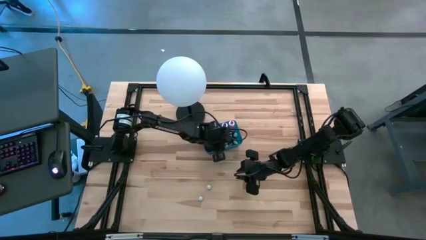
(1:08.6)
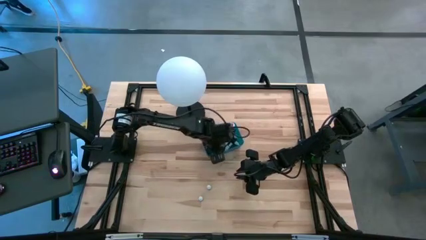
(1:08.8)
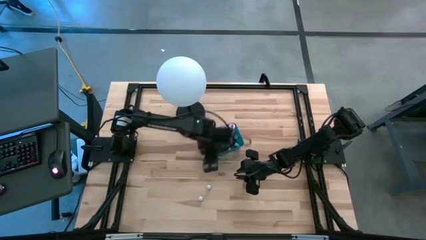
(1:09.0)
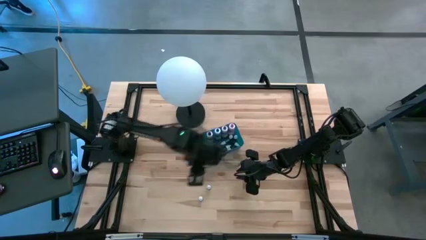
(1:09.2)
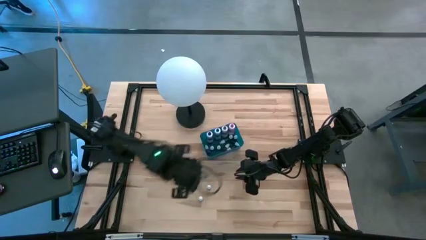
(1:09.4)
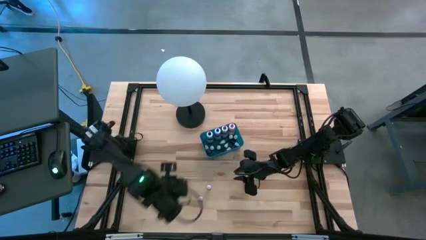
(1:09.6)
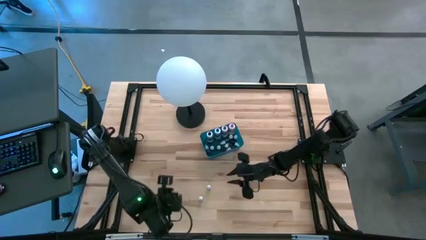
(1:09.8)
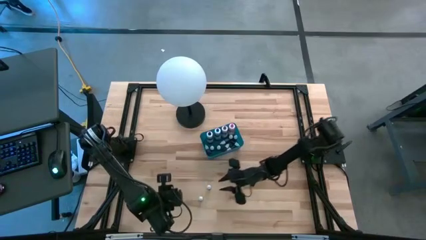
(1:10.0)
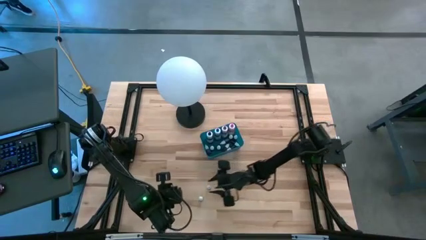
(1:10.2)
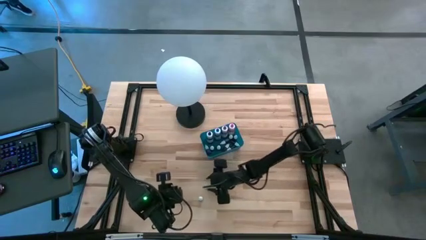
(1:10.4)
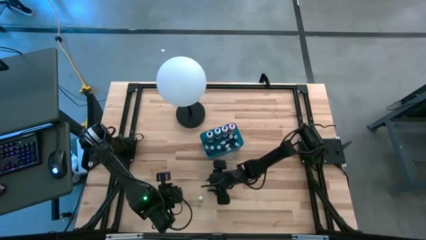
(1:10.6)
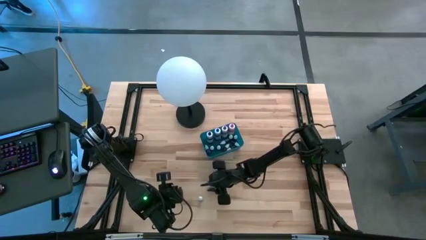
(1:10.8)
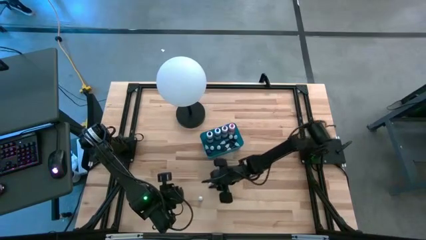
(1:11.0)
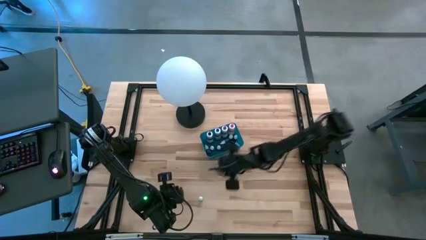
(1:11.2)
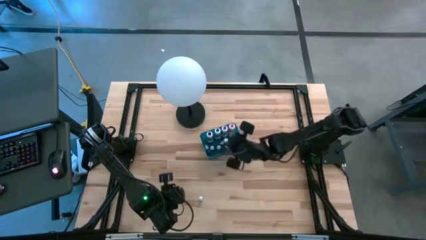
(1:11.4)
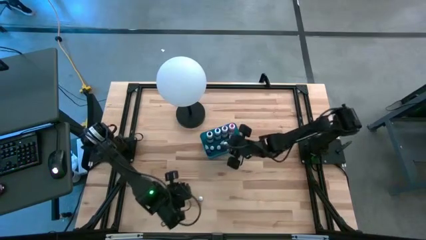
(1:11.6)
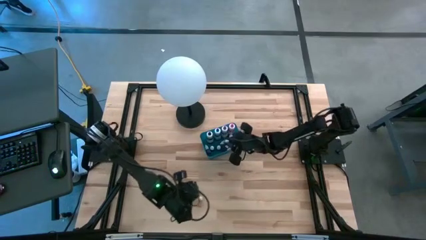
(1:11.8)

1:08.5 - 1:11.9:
Task: Pick & Place food coloring
Put the black food coloring bottle into the bin

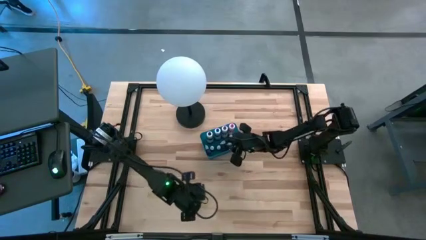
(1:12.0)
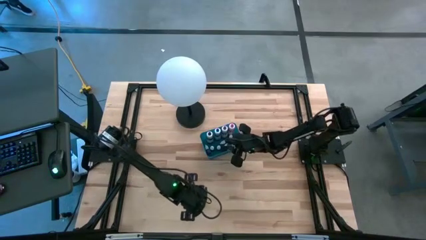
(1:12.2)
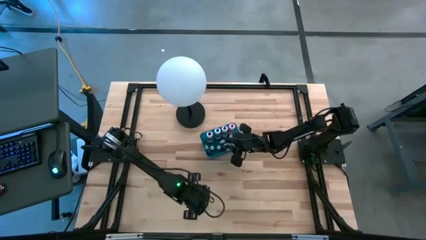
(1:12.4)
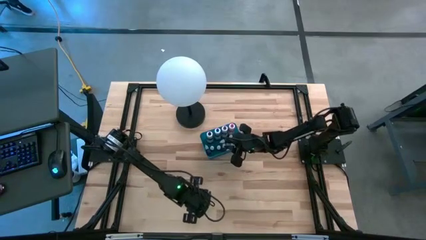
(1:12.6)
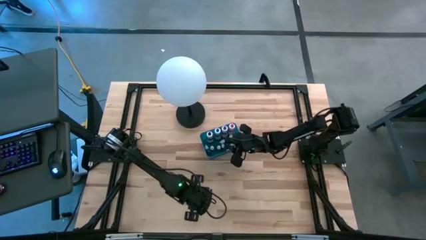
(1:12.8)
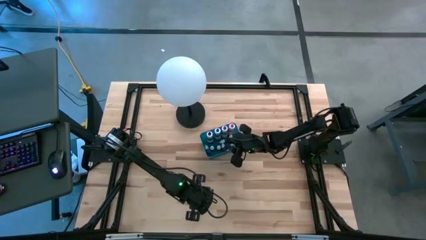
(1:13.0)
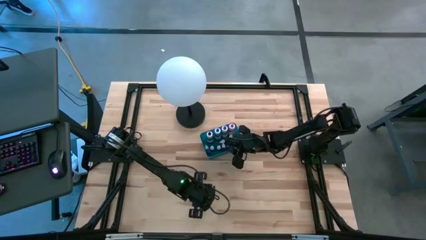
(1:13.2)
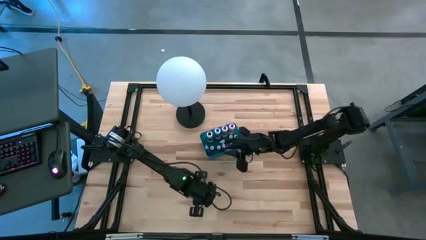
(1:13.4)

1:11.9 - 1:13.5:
Put the green food coloring bottle into the bin

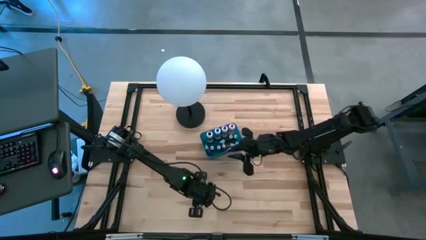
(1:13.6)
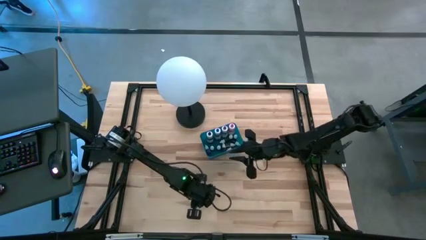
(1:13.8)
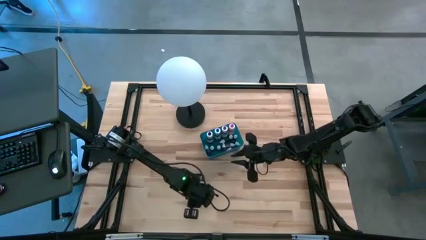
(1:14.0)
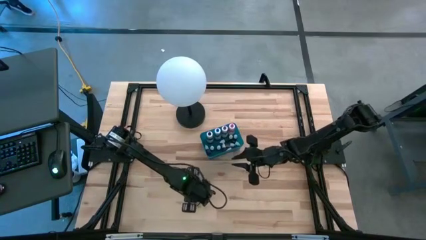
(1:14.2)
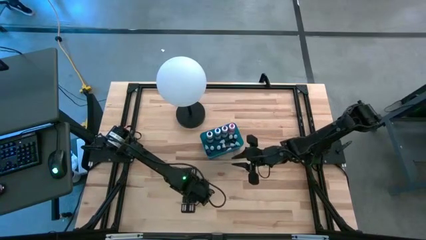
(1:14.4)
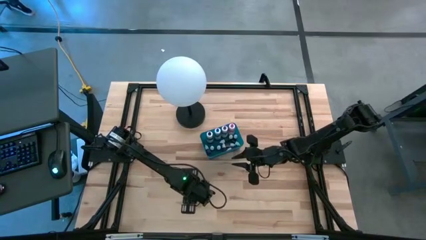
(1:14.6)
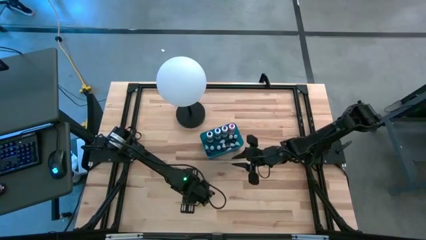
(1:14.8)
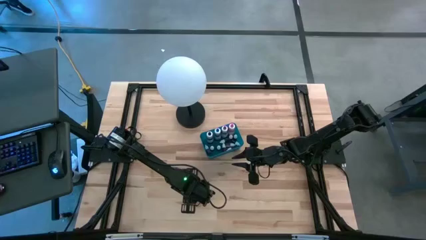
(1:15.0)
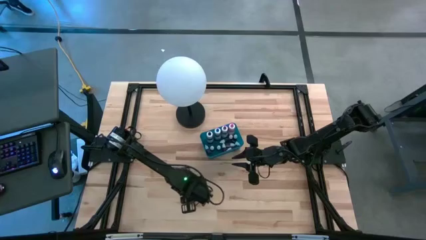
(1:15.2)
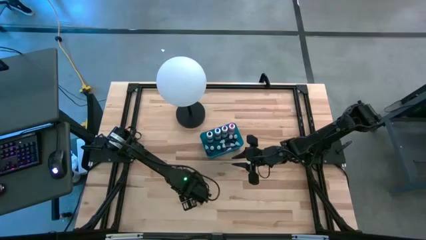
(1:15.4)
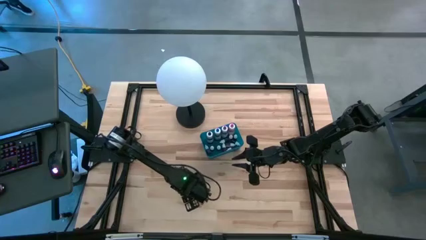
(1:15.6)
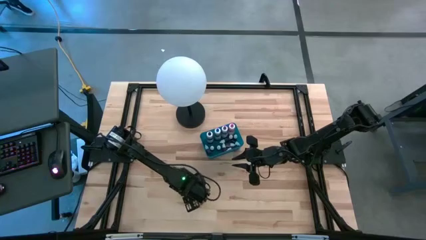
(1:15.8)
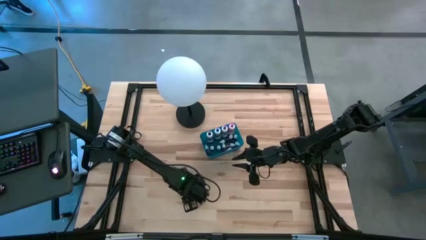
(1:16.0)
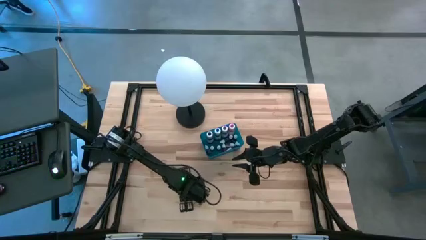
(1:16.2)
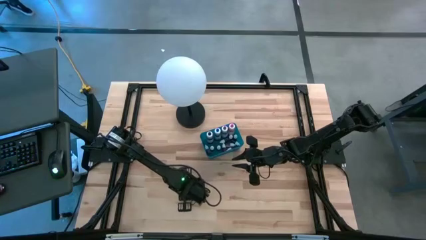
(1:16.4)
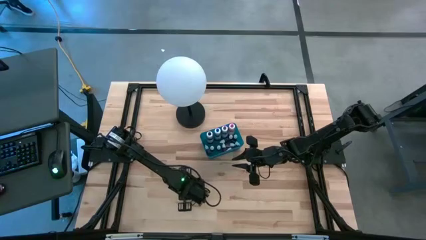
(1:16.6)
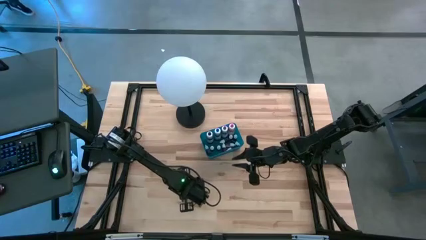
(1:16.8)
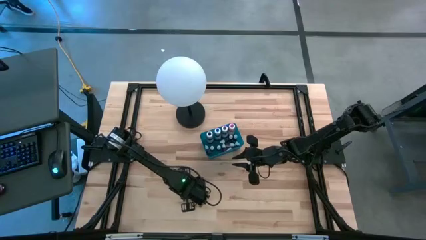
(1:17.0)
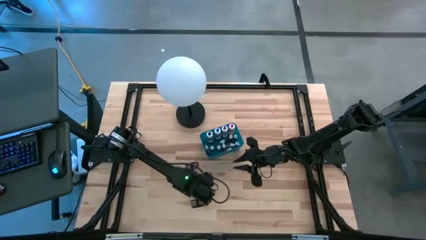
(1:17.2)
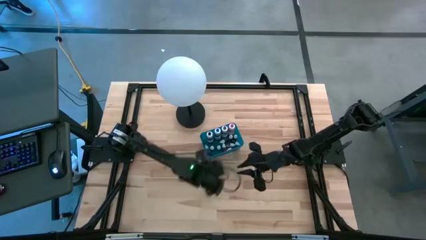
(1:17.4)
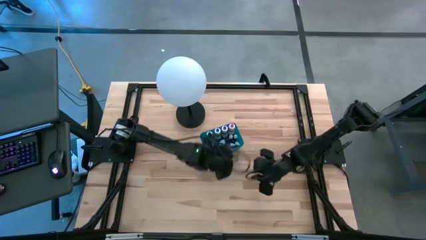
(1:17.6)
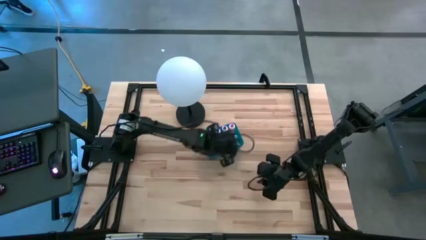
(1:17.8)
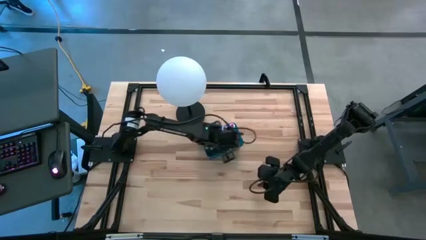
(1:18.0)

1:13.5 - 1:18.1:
Put the green food coloring bottle into the bin

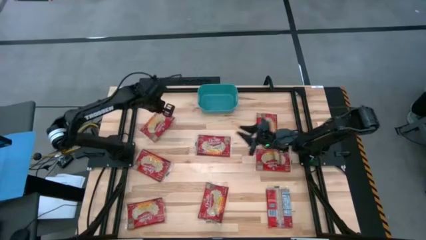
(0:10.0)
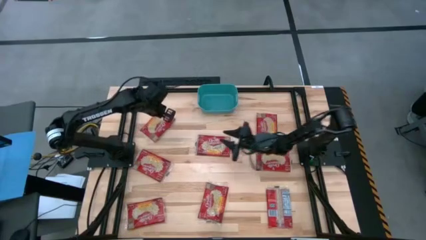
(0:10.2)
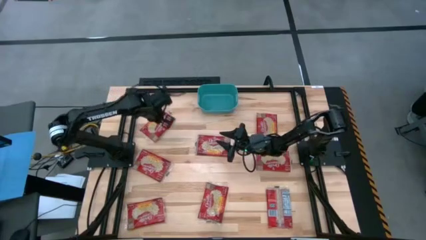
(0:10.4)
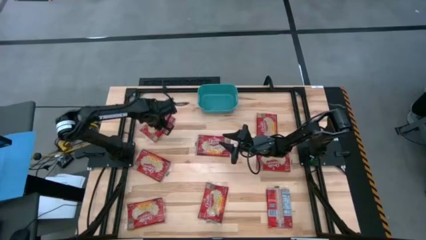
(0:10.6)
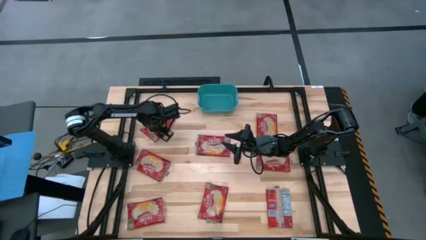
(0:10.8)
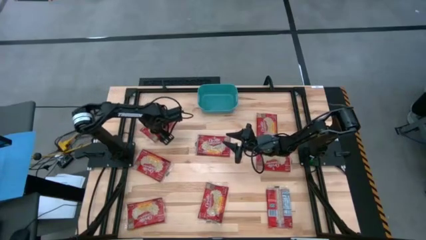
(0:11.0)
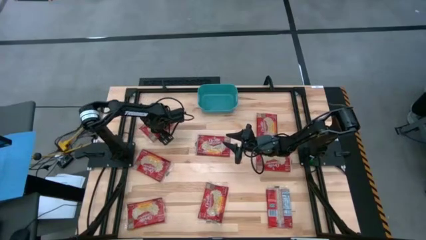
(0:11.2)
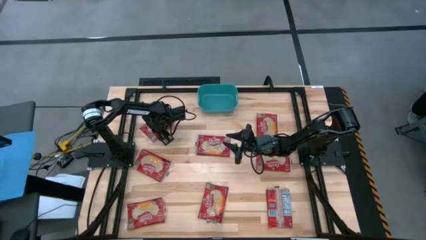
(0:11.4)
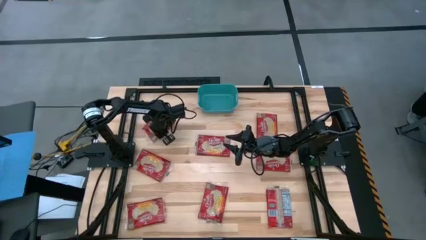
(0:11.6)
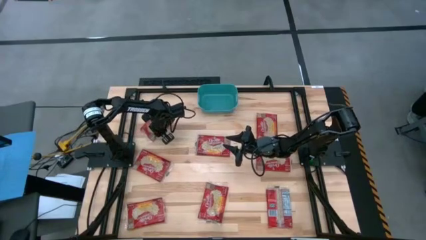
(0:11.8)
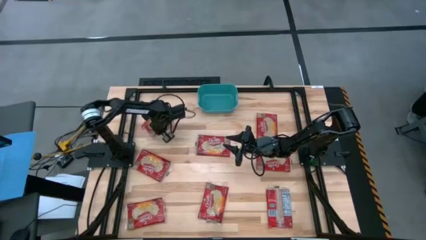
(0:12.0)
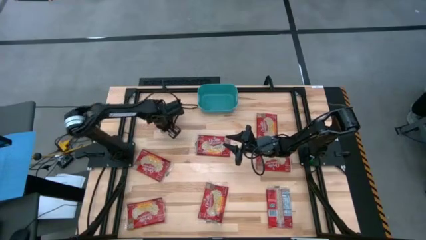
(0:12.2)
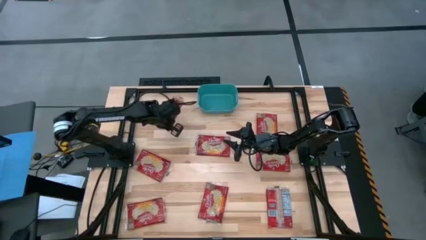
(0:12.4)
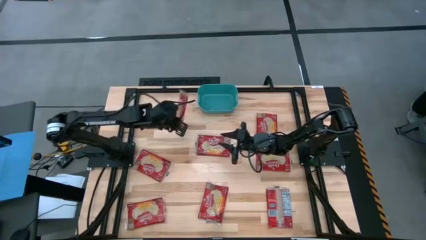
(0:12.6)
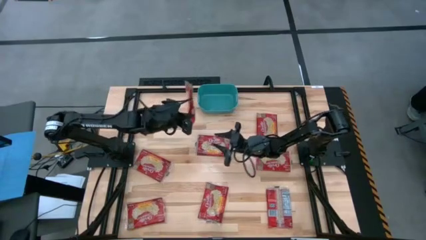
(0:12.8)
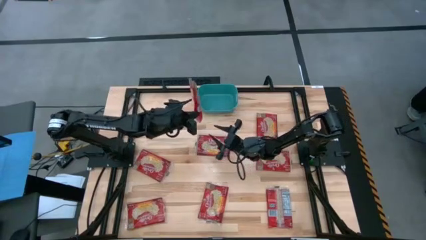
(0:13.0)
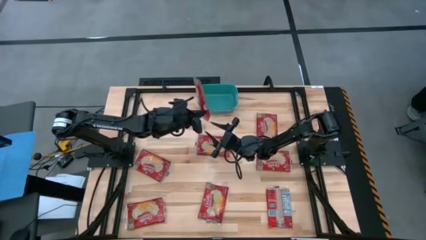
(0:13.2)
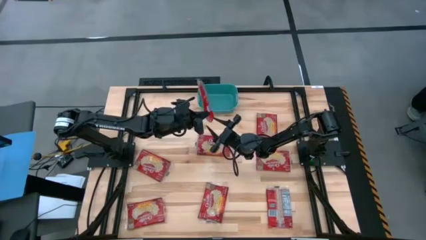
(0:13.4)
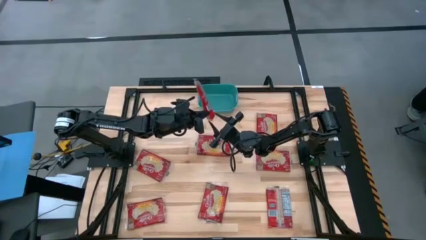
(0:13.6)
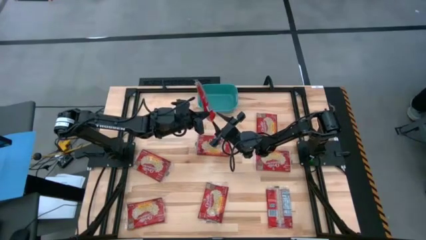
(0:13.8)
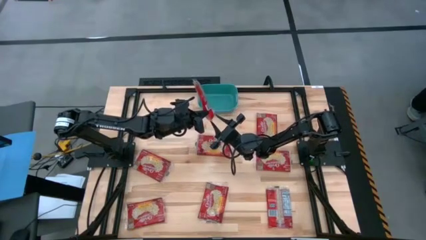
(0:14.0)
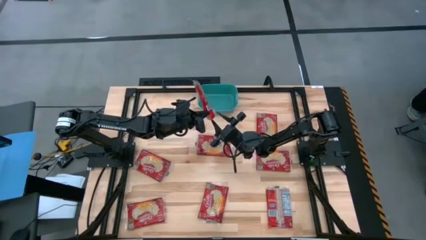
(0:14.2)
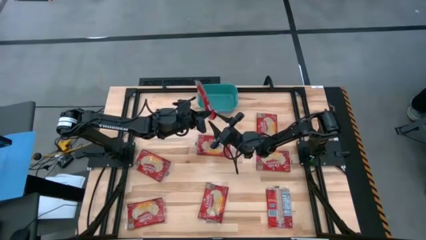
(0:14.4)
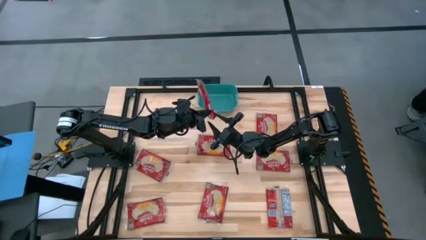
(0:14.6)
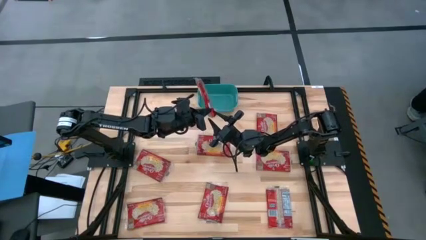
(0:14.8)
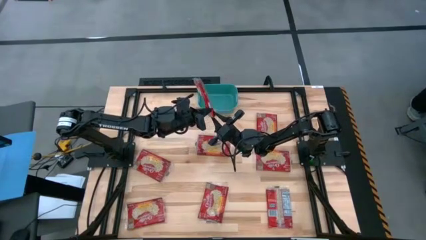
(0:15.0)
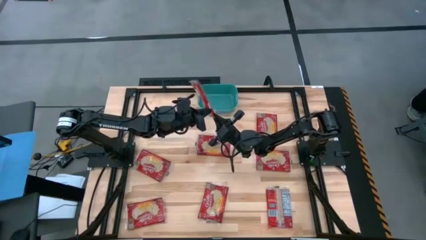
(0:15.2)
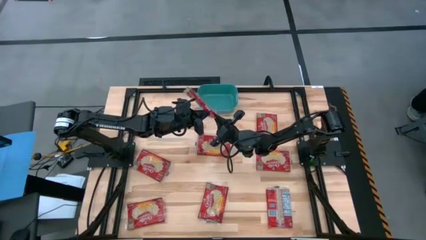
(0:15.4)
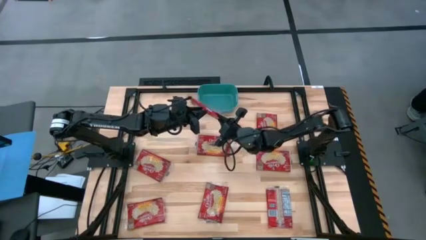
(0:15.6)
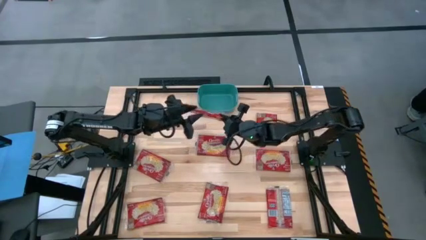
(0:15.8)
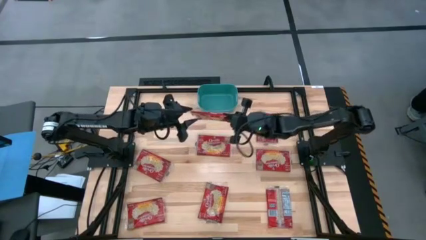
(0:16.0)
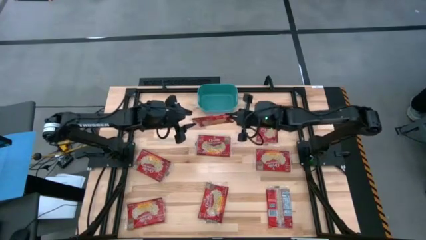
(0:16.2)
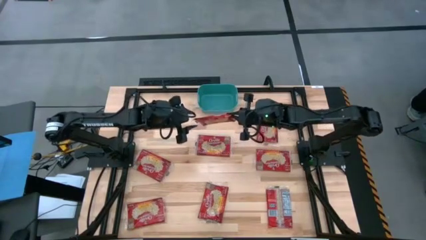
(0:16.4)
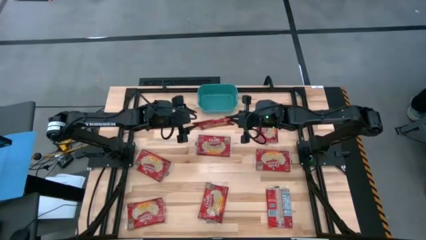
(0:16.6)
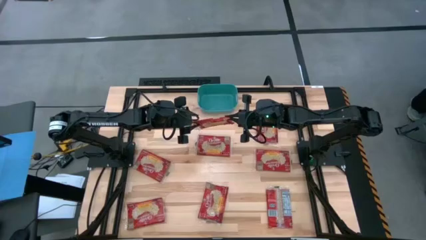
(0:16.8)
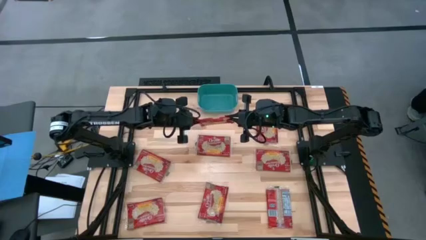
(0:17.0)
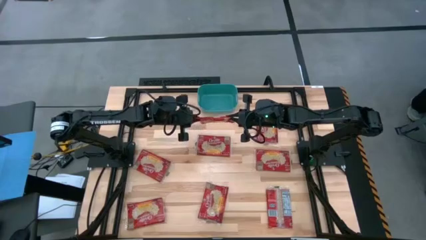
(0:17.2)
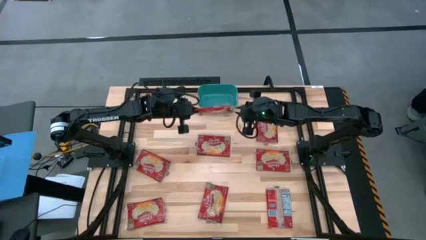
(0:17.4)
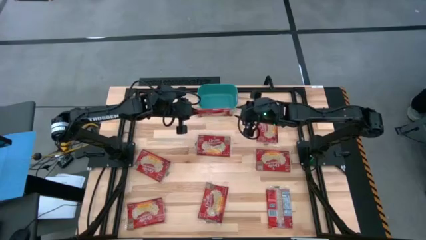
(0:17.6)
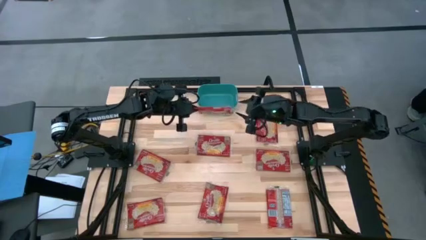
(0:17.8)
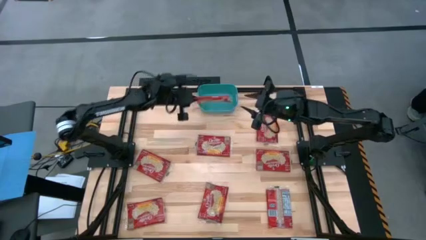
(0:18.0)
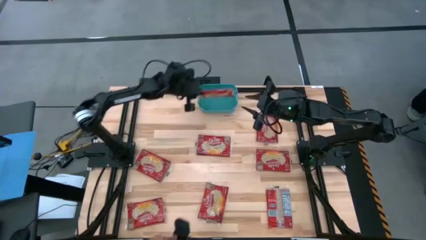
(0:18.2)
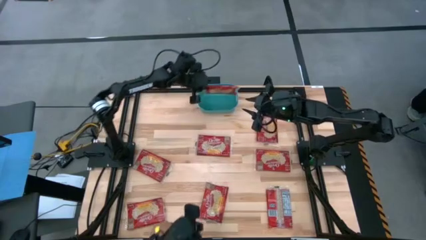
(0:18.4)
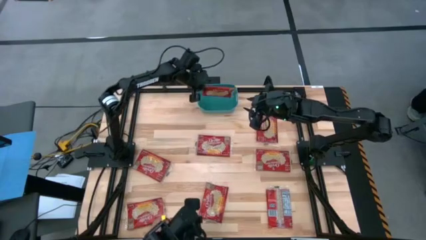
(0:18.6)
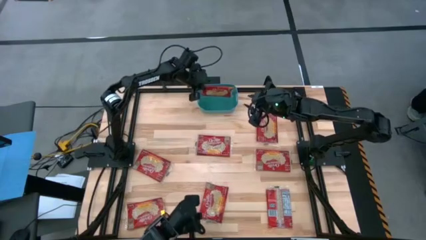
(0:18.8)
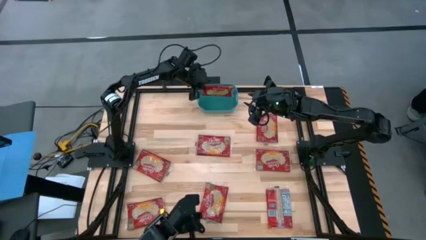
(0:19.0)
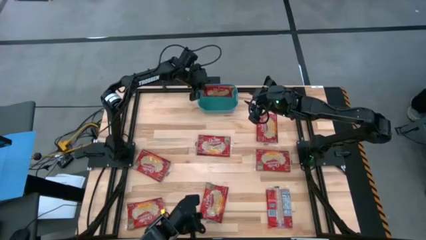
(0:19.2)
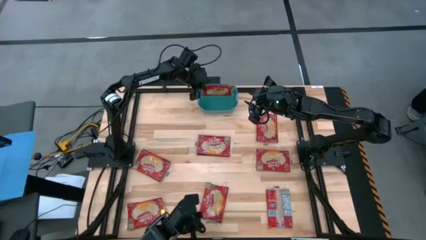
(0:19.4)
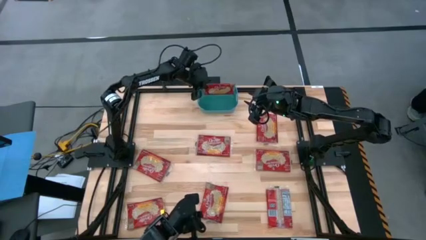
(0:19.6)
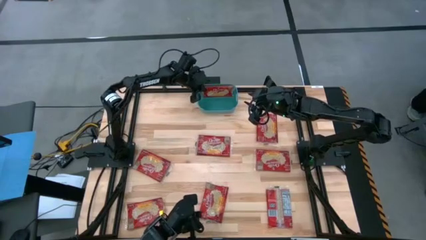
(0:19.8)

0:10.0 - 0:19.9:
Task: Sort popcorn bags into baskets
Put the red popcorn bag into the blue bin
